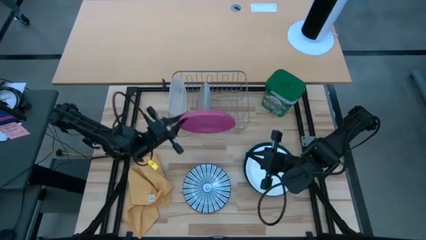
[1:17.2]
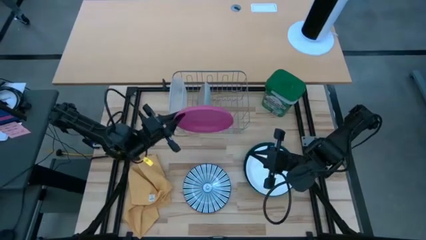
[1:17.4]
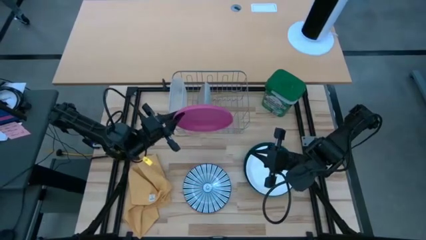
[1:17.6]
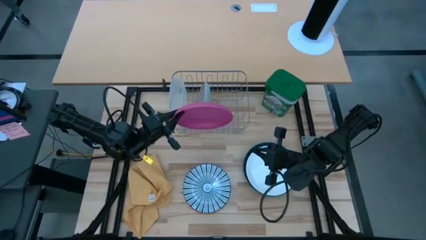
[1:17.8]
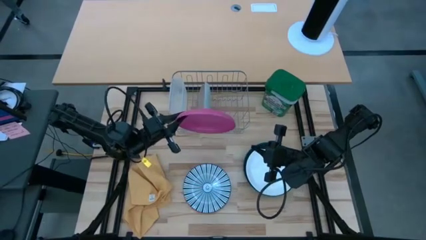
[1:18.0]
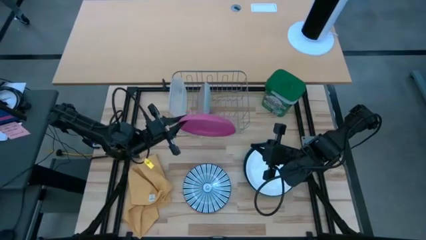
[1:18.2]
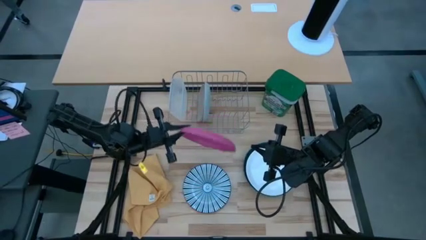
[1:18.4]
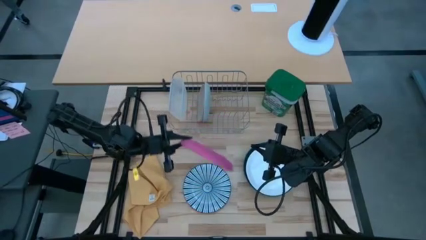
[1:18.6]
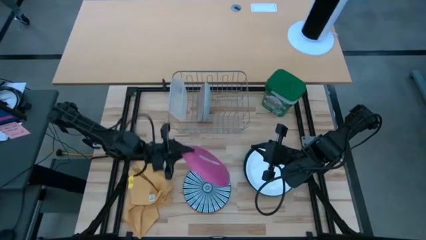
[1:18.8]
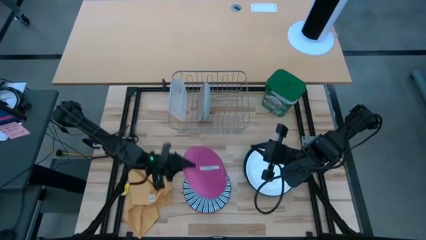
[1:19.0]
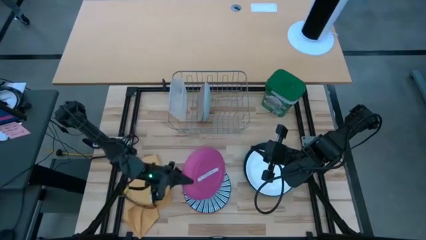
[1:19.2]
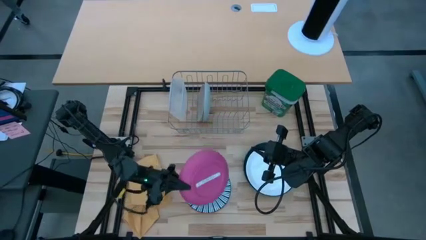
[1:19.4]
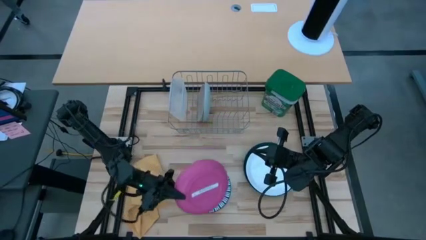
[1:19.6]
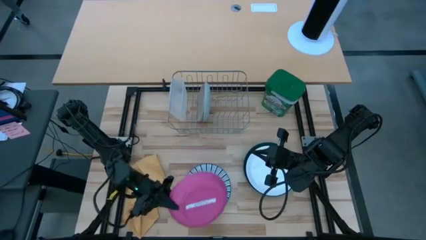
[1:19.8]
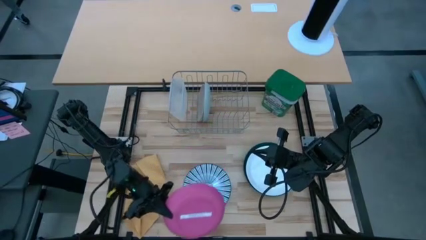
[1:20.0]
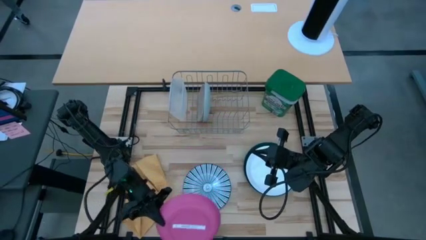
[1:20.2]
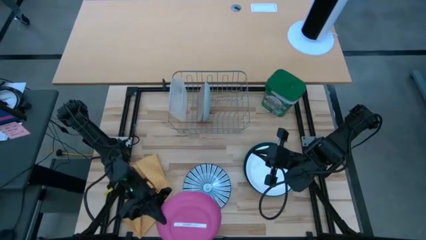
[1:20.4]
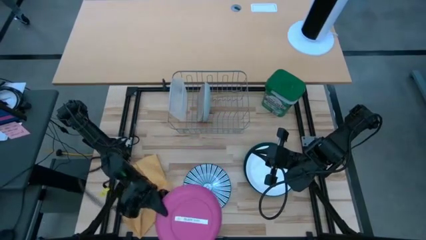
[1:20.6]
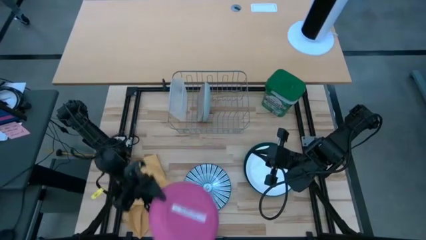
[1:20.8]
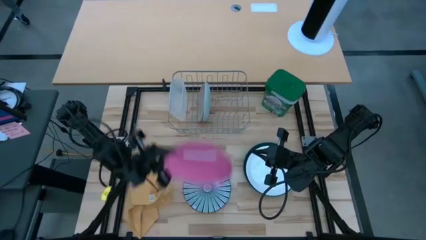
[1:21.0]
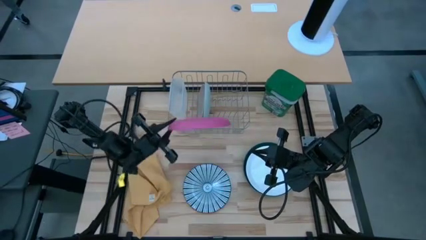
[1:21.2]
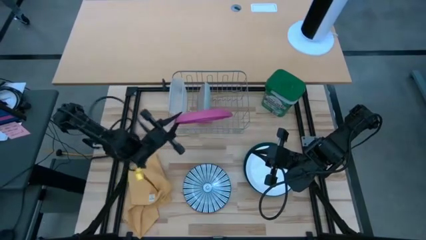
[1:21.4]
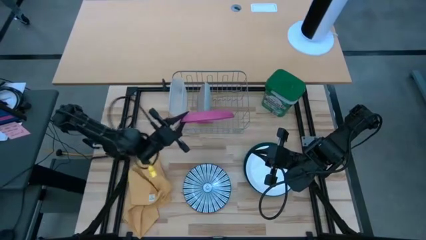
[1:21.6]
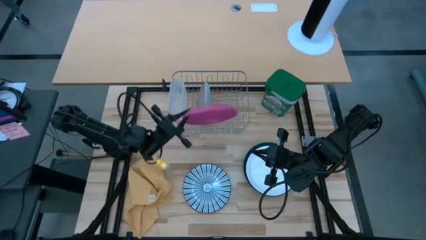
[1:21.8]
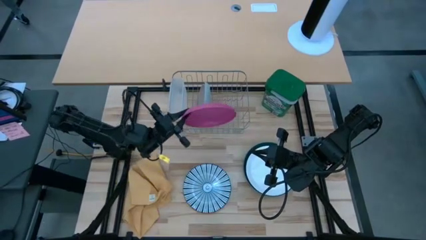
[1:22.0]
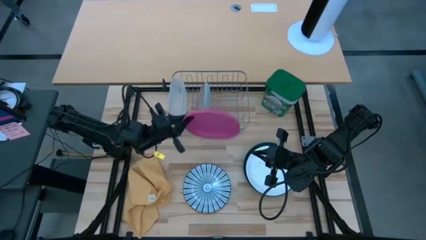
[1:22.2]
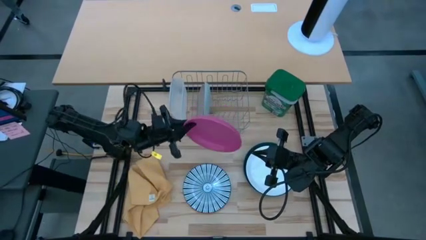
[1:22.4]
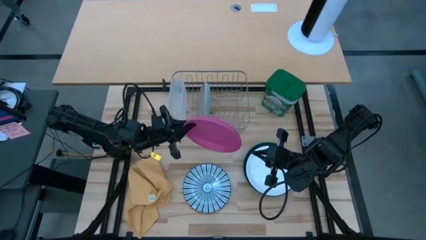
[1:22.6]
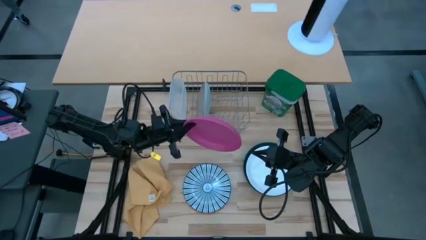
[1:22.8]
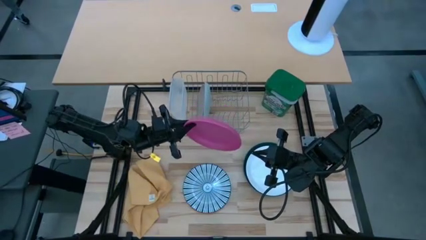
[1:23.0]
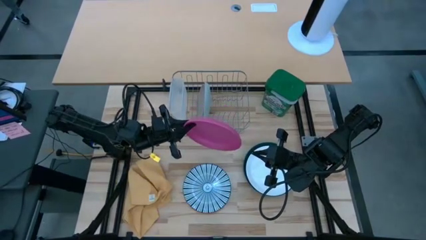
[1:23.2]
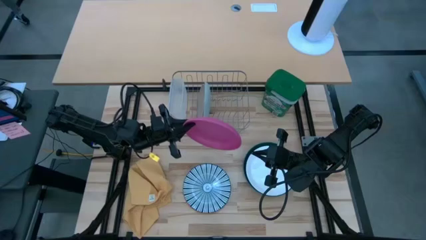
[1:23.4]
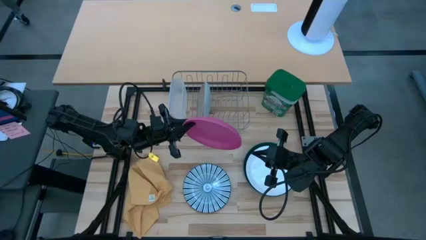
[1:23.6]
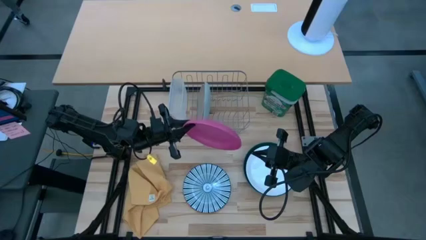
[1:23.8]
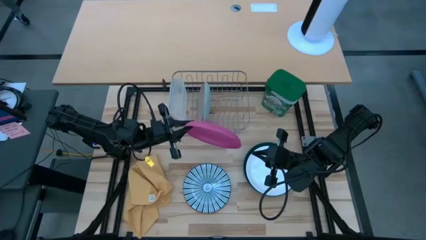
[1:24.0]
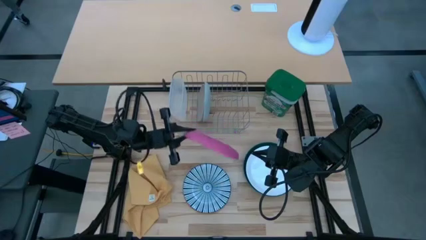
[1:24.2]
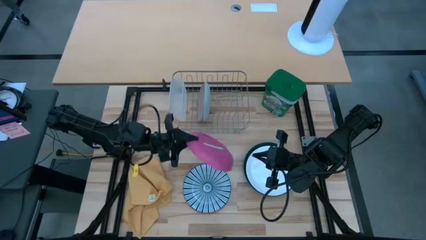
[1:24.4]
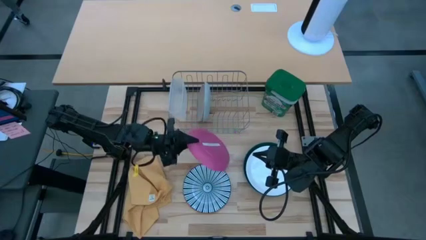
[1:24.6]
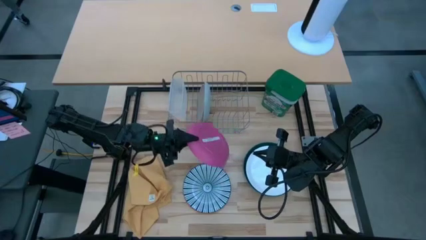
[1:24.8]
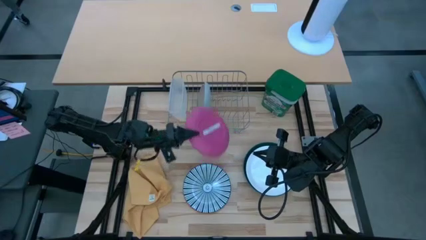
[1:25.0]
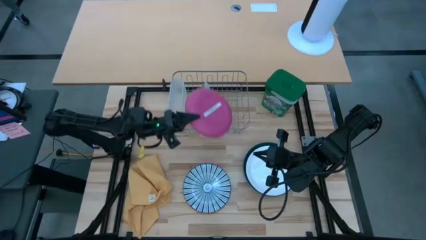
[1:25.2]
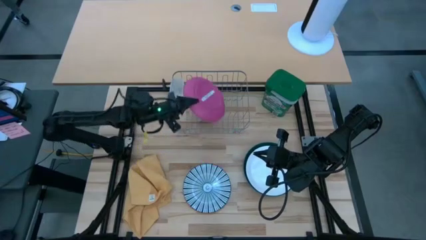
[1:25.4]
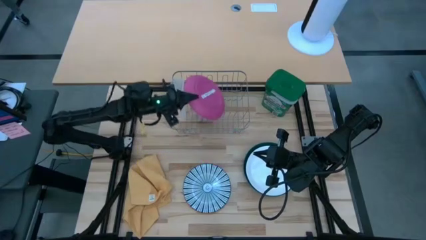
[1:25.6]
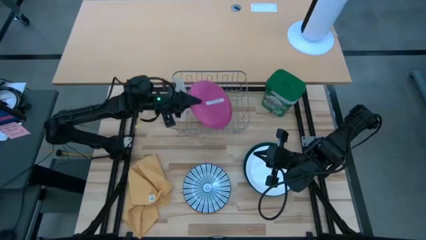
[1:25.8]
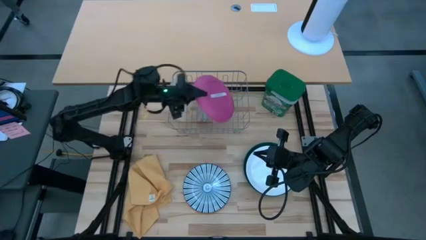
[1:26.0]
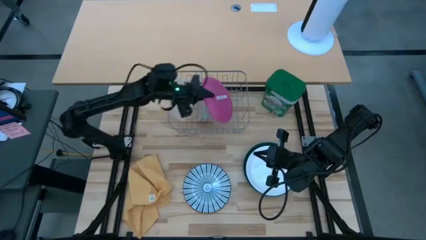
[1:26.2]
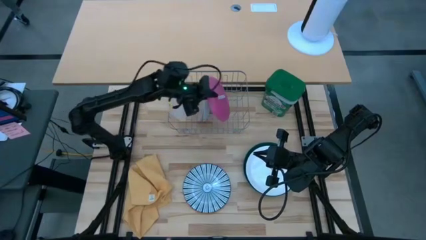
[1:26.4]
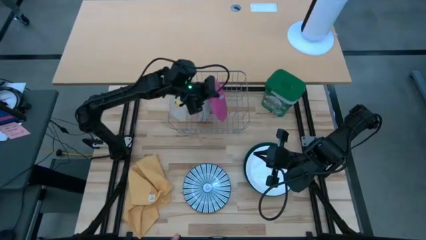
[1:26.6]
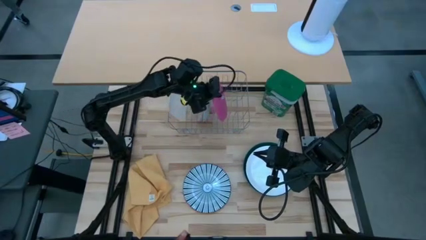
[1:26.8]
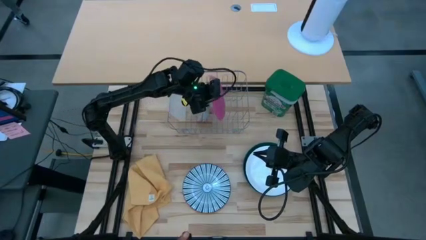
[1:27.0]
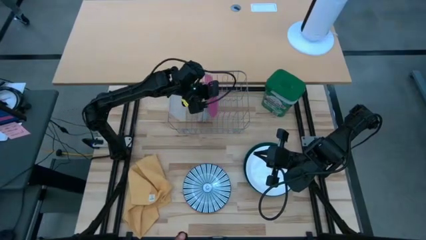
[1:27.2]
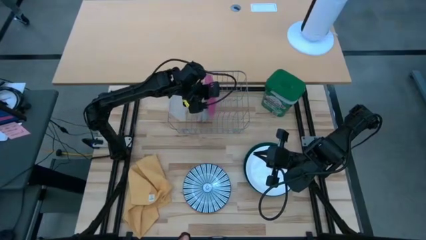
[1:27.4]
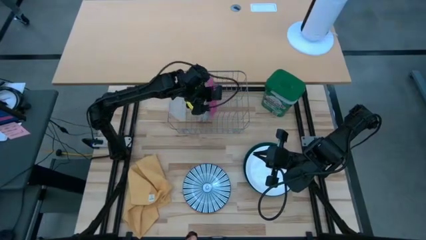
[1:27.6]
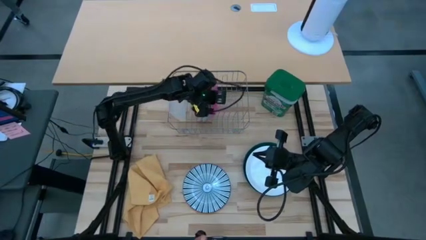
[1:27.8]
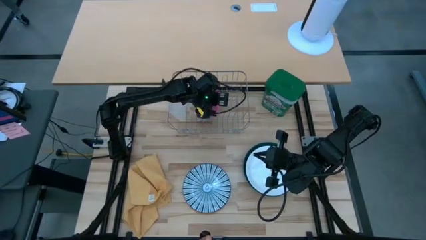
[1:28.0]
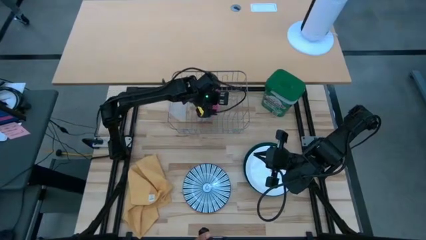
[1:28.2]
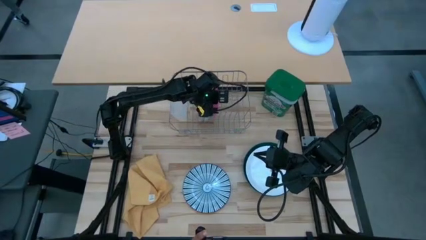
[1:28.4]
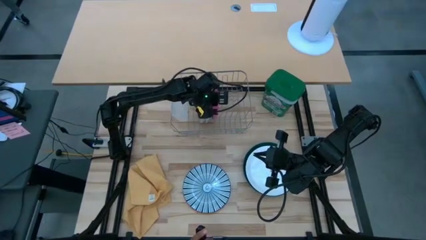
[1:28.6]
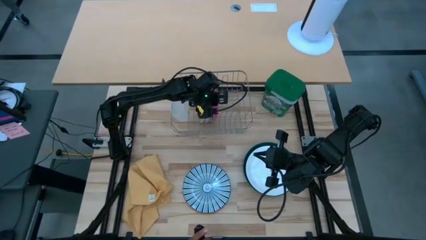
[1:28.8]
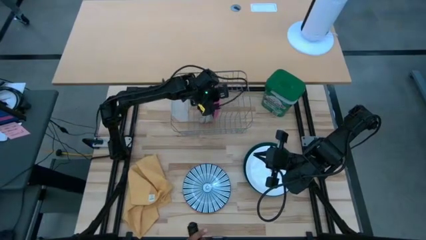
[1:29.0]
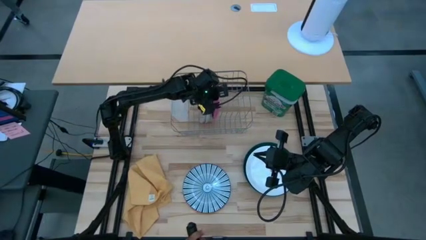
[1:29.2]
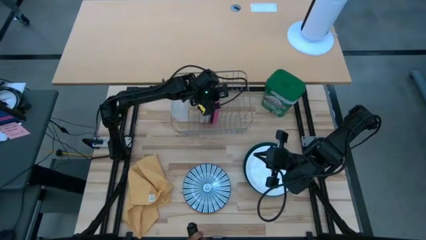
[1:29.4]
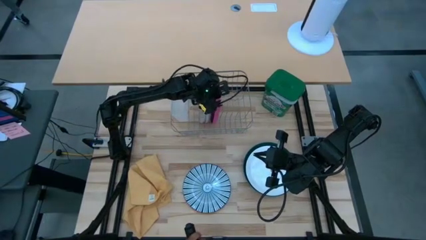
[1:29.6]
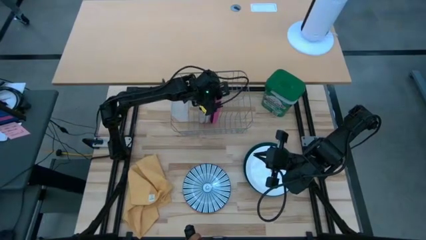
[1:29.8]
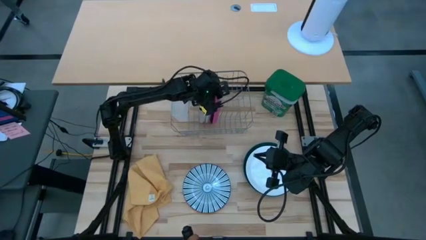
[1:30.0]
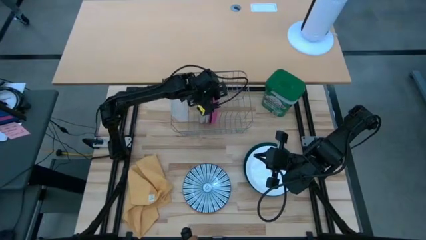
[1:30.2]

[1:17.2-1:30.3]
Task: Sort dishes
Put the pink plate into the dish rack

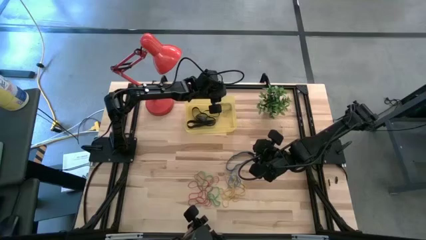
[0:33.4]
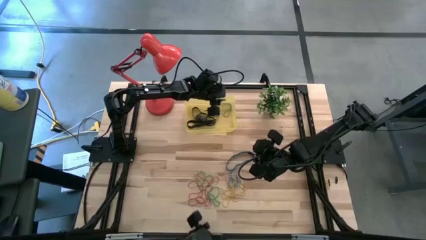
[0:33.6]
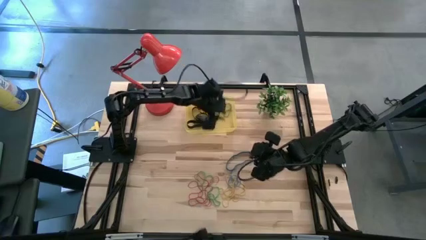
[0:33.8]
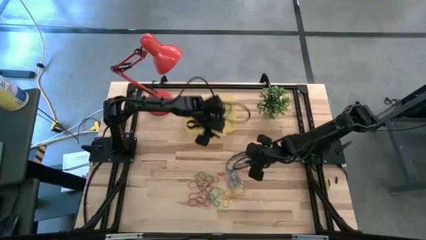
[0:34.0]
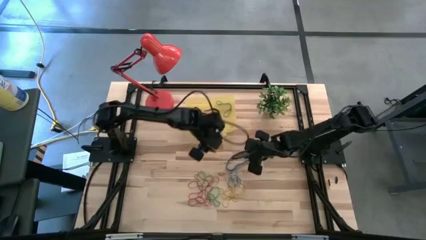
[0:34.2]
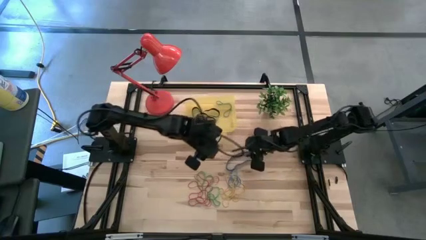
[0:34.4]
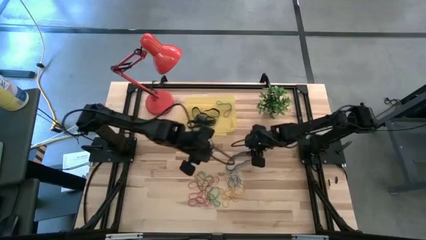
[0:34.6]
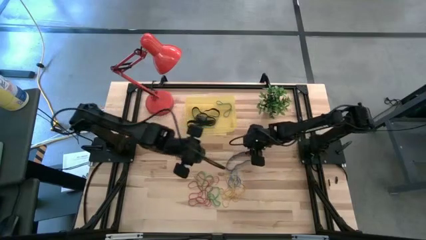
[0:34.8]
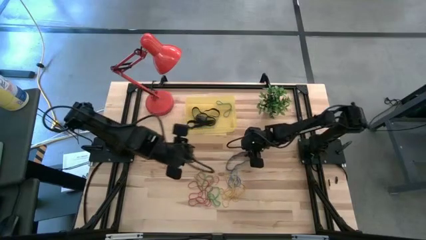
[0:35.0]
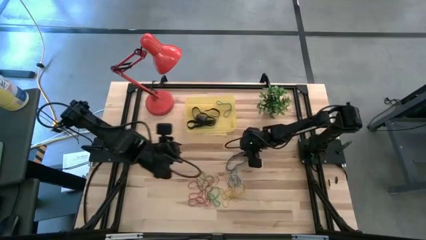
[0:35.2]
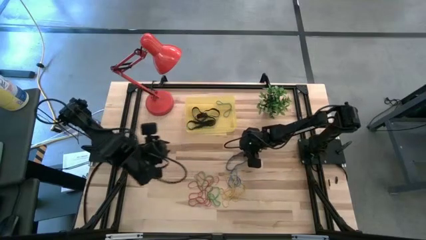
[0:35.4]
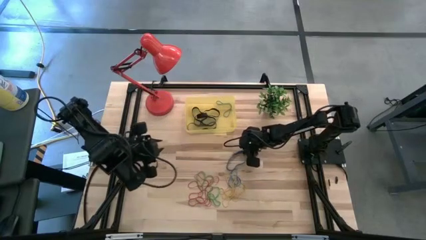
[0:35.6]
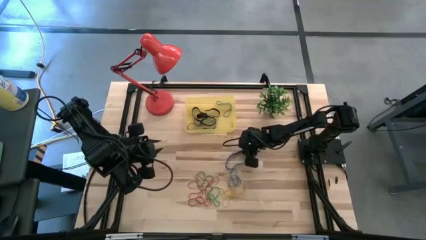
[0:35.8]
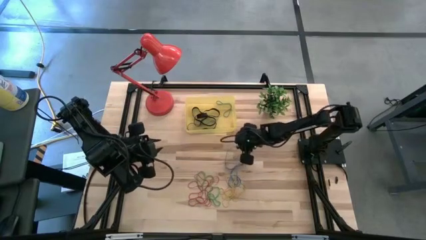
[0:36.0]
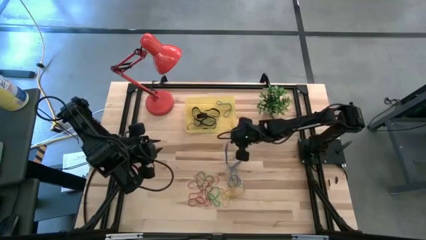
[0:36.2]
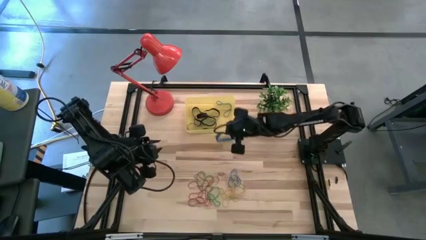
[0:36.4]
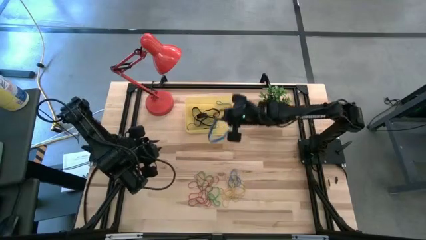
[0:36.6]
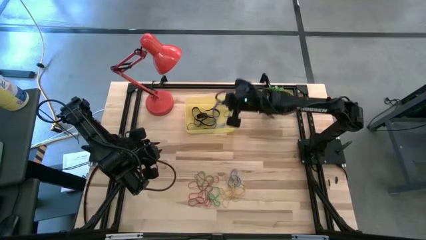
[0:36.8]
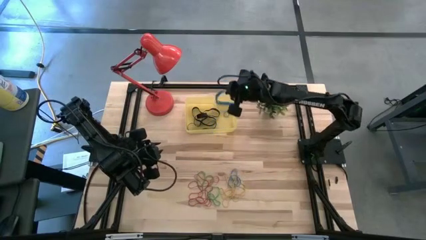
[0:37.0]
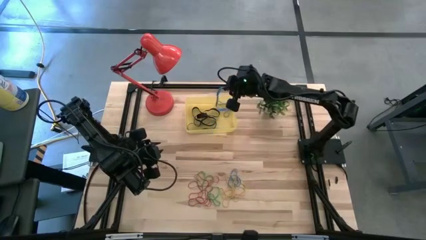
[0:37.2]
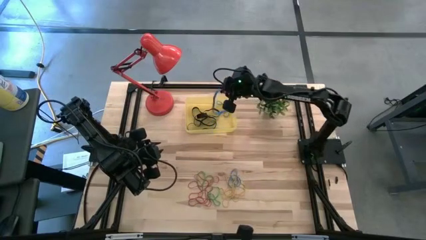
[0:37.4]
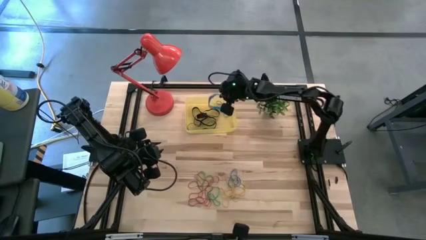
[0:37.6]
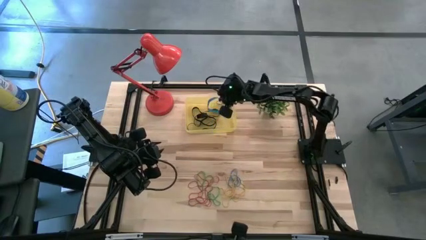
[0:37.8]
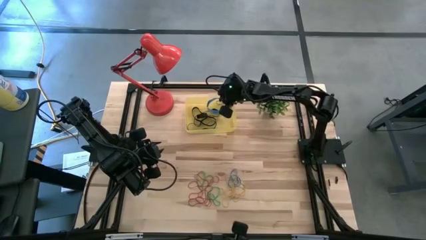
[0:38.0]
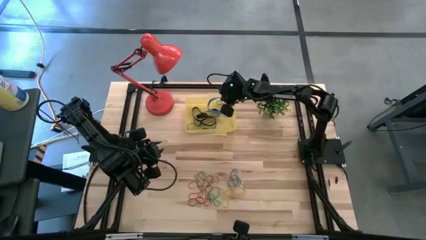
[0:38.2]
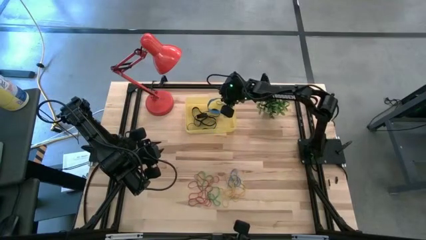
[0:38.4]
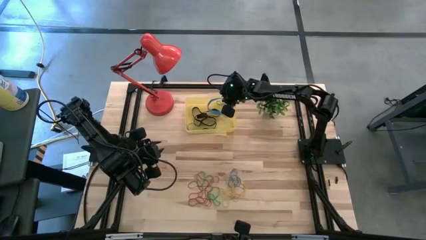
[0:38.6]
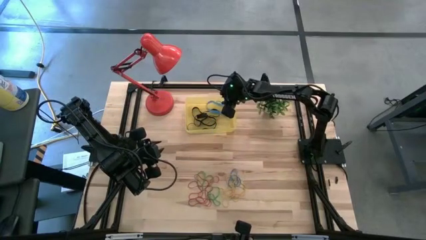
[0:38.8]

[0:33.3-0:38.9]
Task: Pick and place rubber bands into bin
Put the blue rubber band into the yellow container
